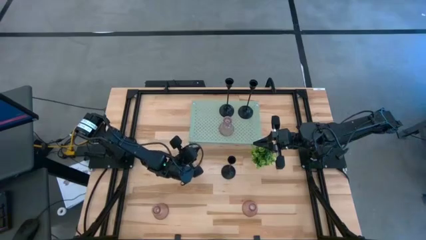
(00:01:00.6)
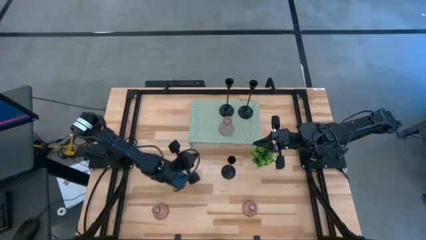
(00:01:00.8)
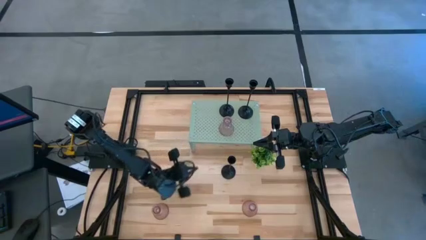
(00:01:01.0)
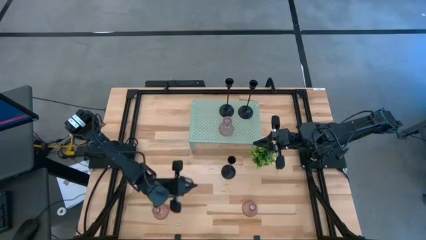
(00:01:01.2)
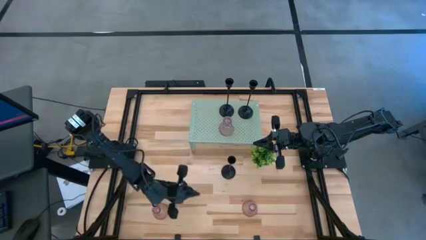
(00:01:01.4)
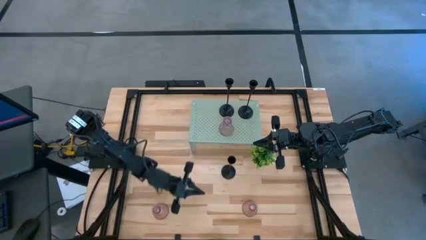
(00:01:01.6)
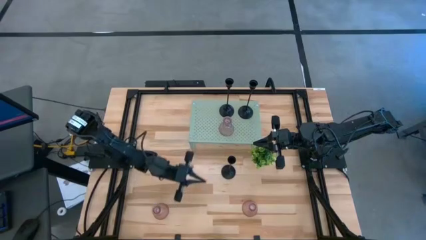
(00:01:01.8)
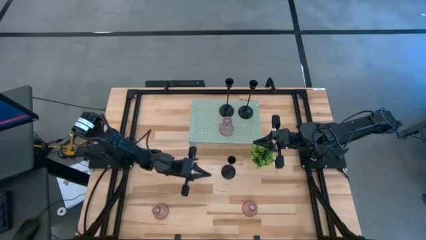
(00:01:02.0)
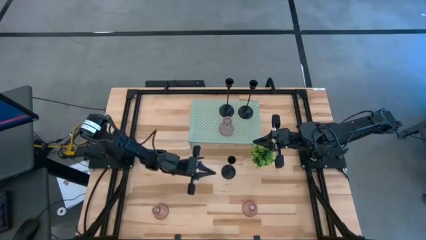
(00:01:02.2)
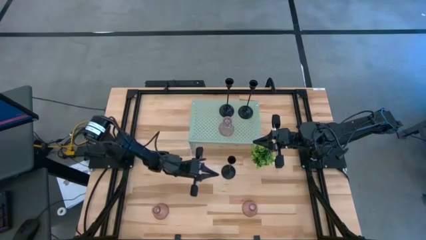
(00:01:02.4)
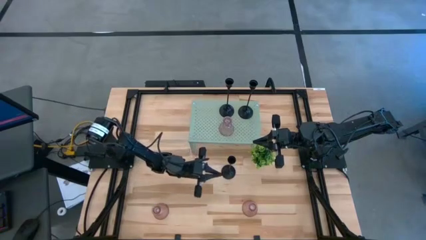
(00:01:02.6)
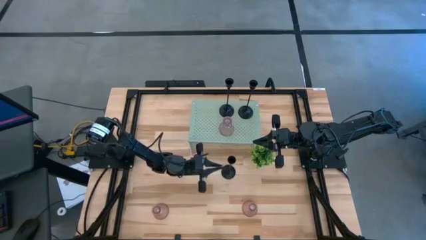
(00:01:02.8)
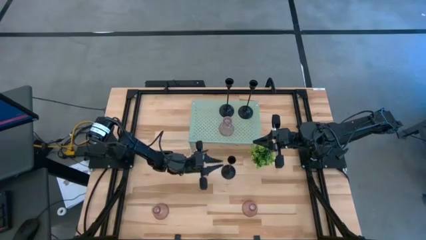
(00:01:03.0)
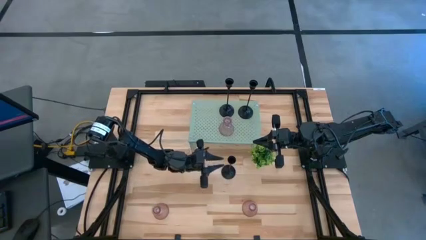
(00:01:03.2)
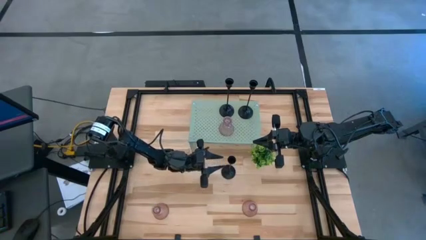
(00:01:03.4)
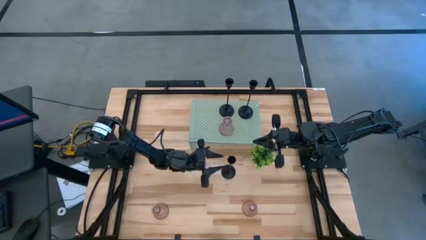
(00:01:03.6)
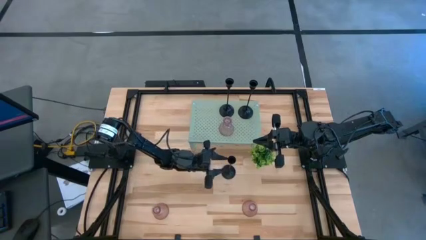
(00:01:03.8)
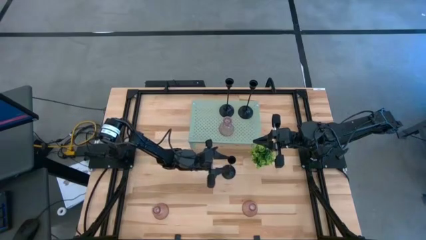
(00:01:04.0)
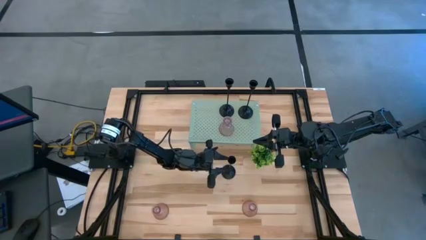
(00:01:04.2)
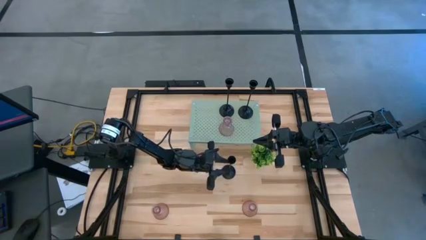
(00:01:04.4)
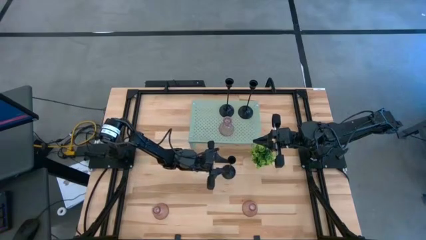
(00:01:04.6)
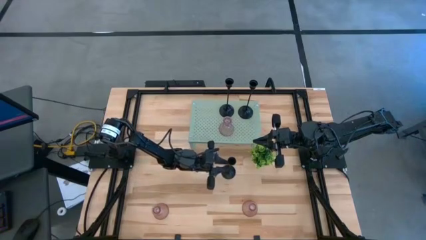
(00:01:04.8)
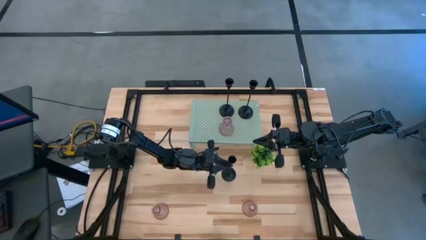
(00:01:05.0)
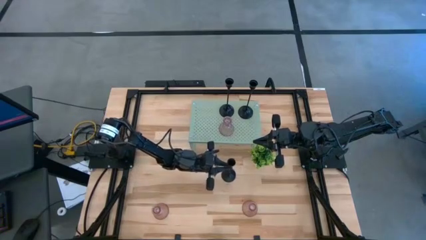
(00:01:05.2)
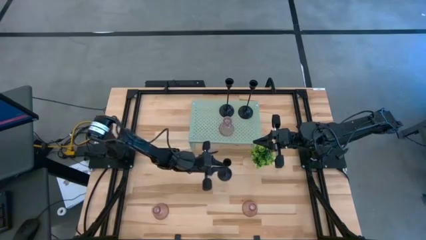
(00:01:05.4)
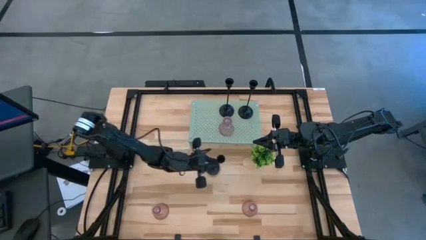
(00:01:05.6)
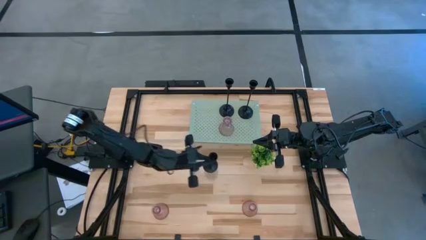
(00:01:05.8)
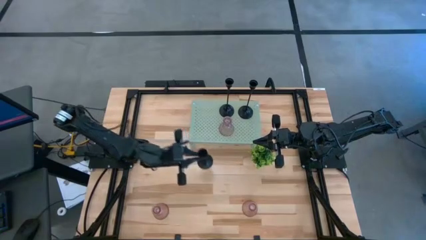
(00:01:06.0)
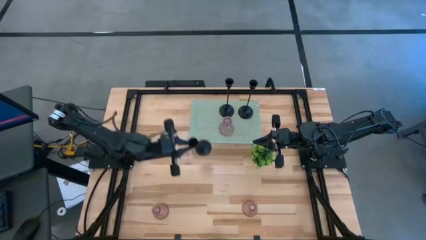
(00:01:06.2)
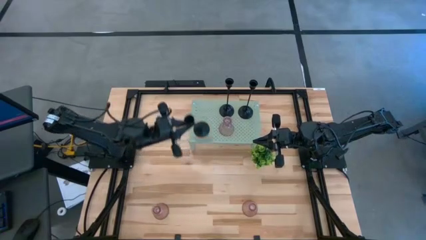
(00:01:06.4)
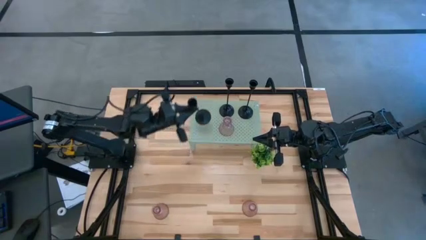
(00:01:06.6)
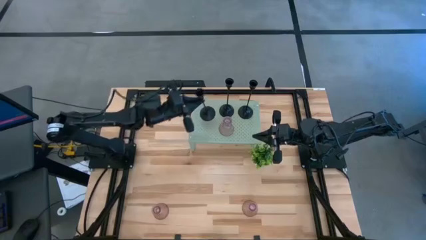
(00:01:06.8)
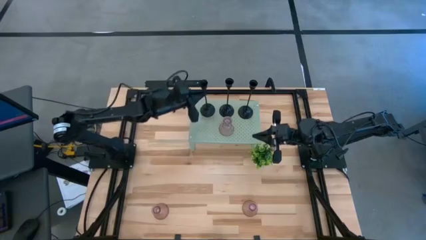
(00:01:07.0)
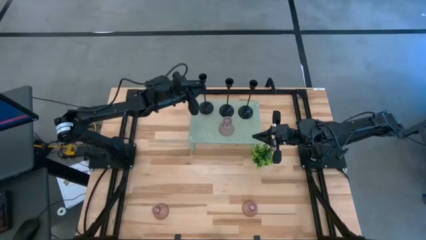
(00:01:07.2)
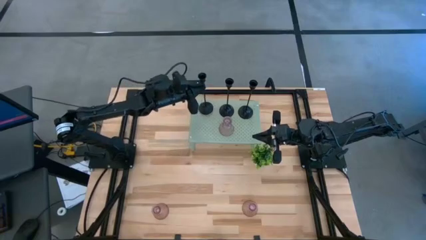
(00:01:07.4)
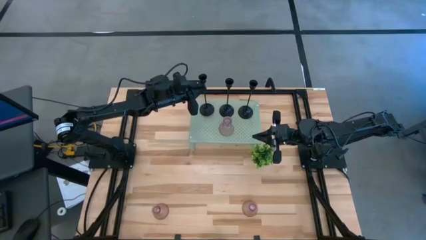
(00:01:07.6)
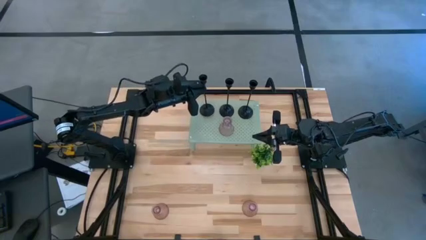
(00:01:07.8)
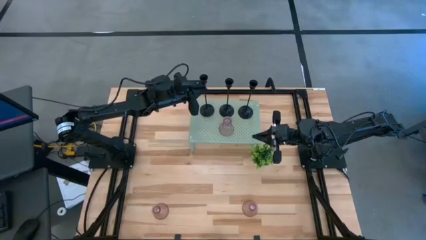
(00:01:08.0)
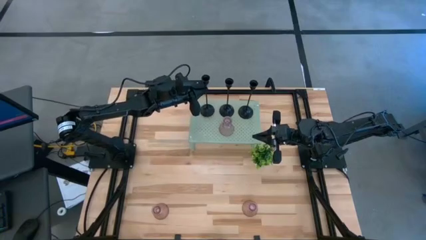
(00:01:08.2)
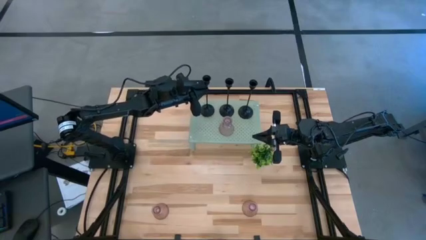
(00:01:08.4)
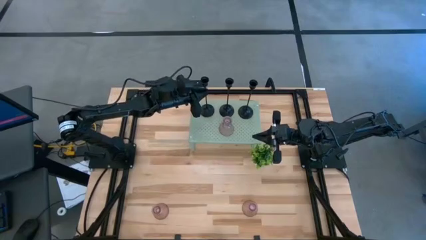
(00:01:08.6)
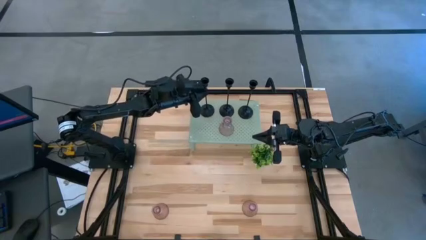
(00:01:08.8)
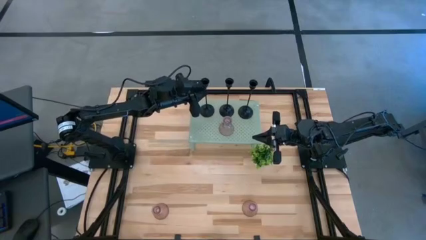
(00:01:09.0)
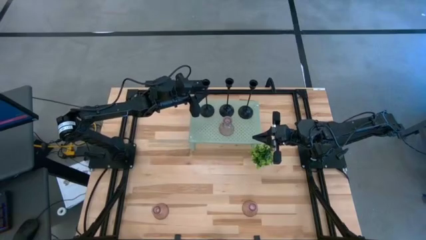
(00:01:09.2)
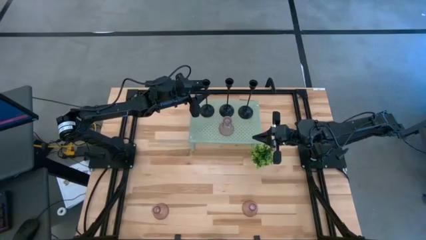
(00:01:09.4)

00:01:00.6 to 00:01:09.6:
Task: Pick & Place candle stick holders
Align the black candle holder on the shelf with the black candle holders
